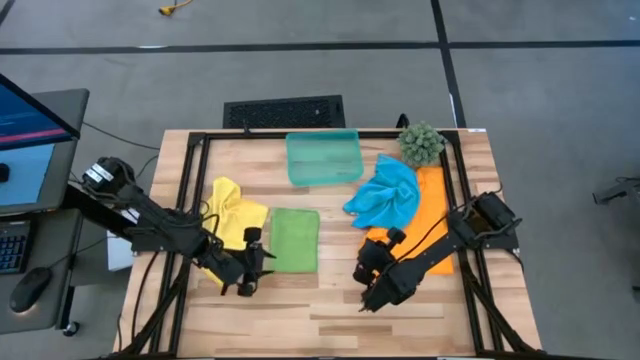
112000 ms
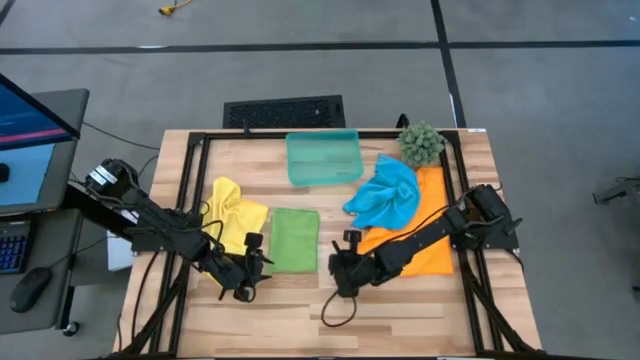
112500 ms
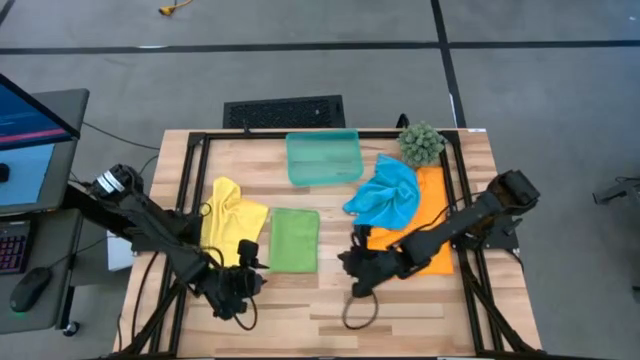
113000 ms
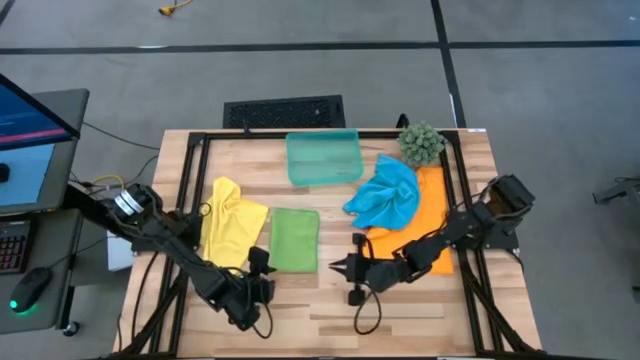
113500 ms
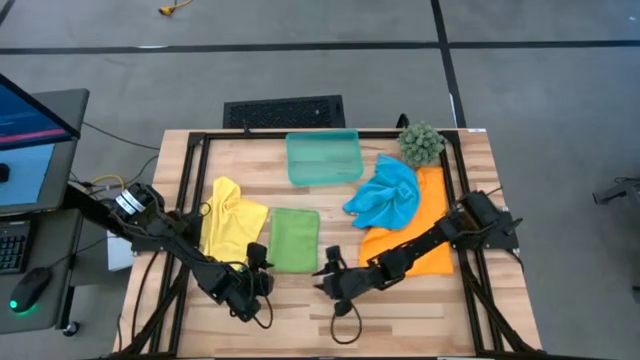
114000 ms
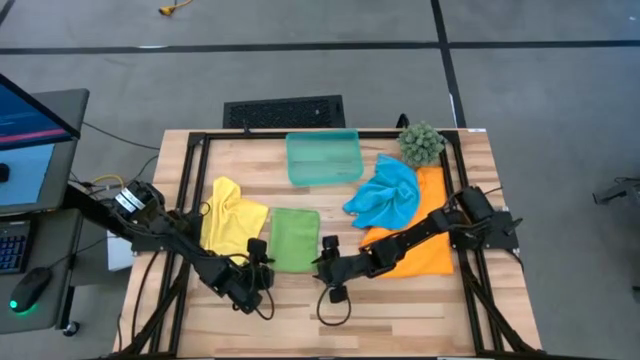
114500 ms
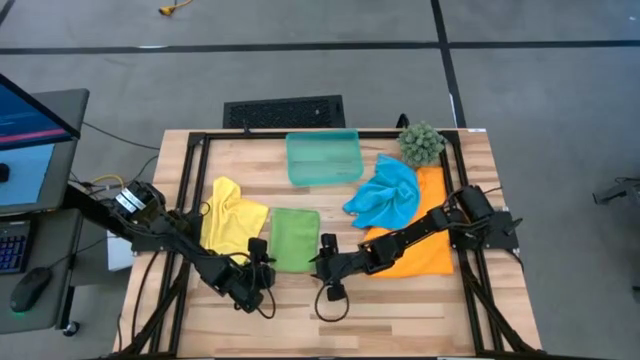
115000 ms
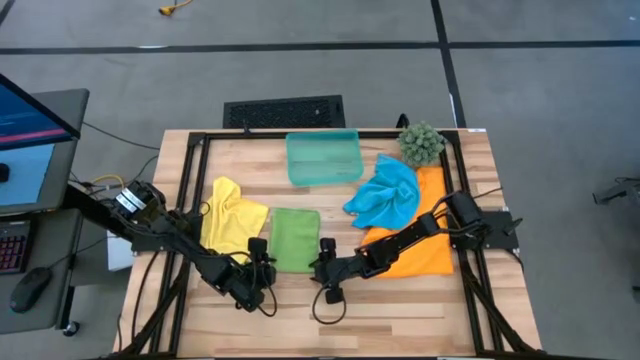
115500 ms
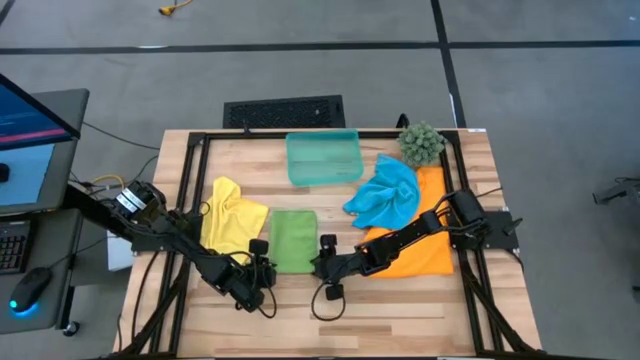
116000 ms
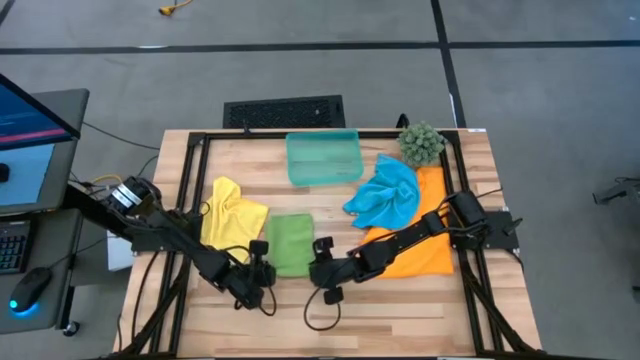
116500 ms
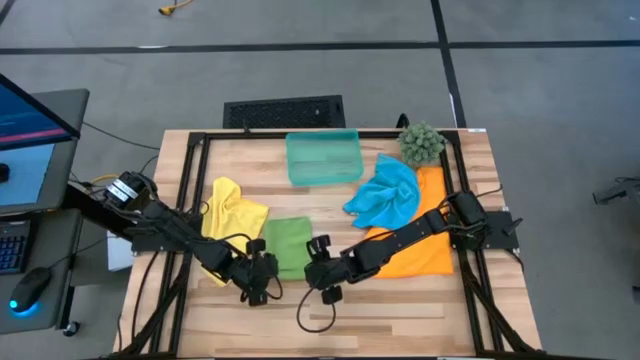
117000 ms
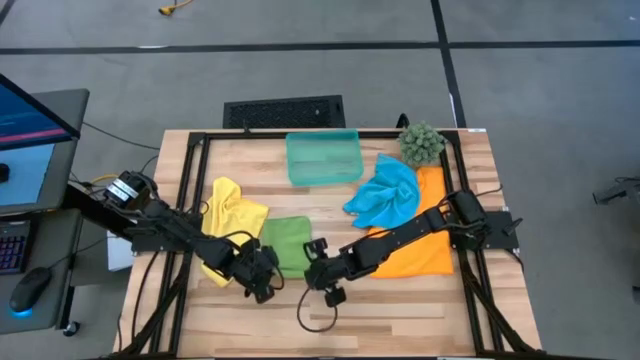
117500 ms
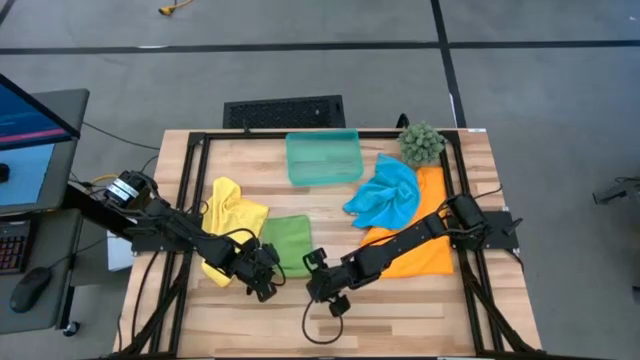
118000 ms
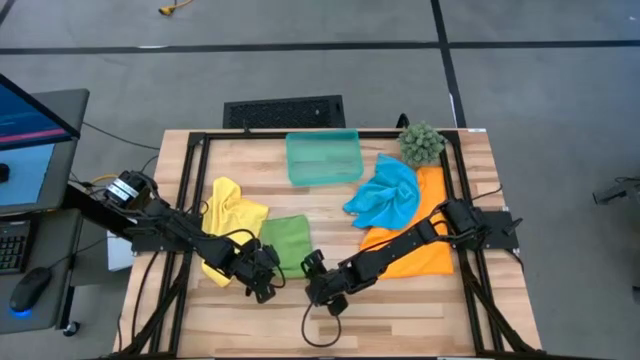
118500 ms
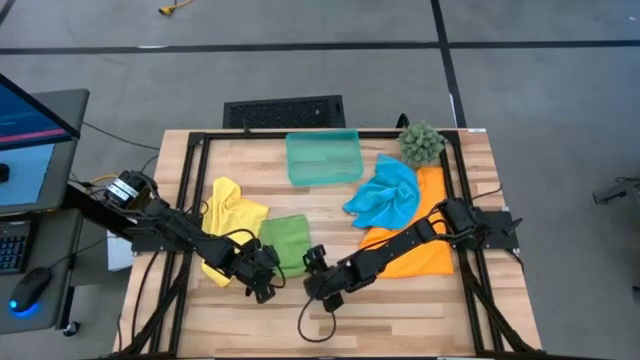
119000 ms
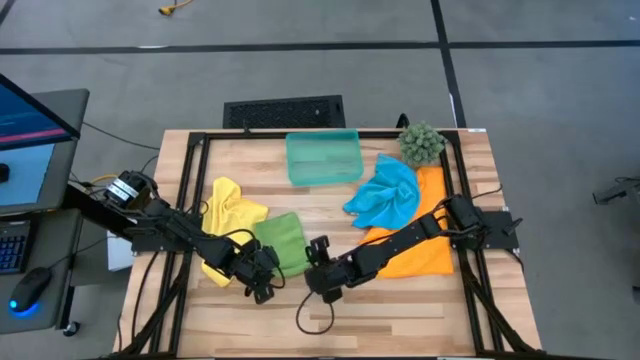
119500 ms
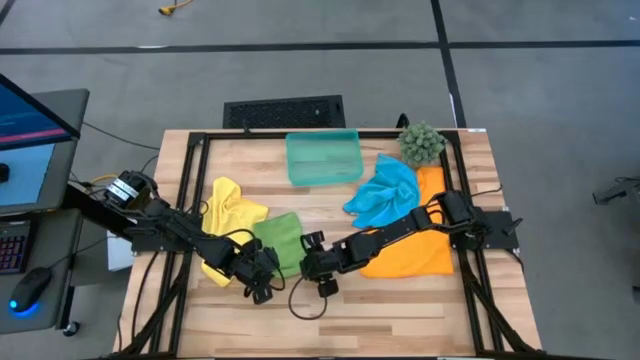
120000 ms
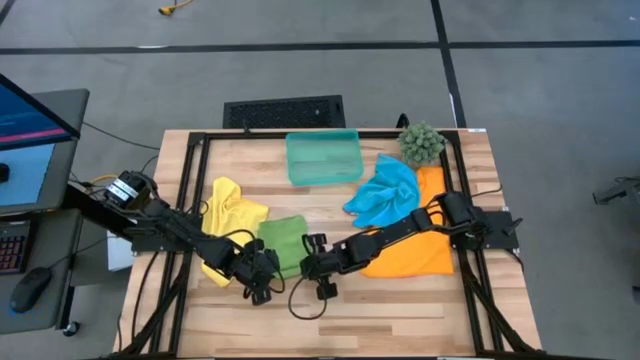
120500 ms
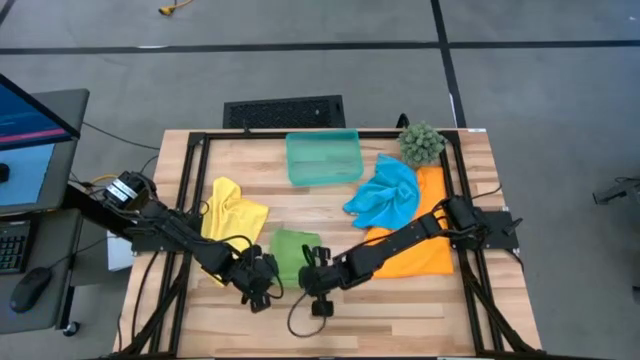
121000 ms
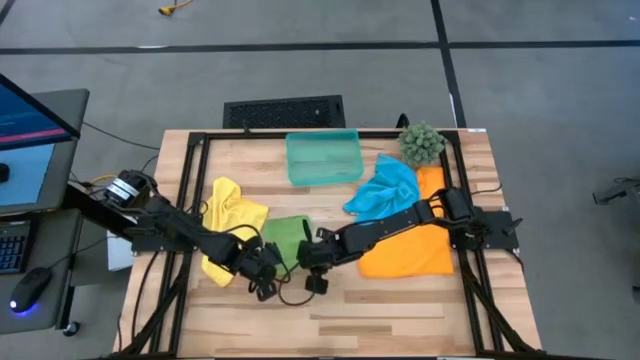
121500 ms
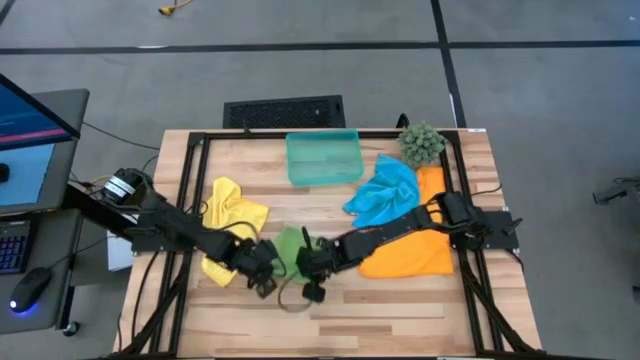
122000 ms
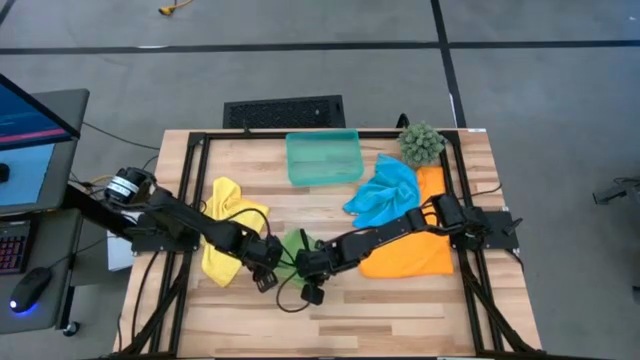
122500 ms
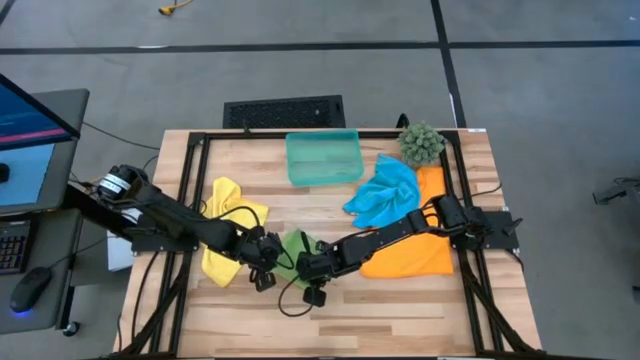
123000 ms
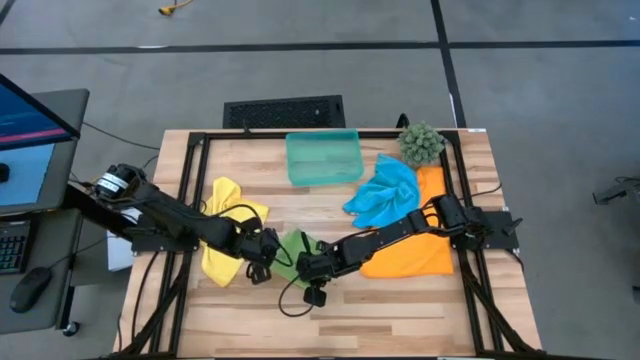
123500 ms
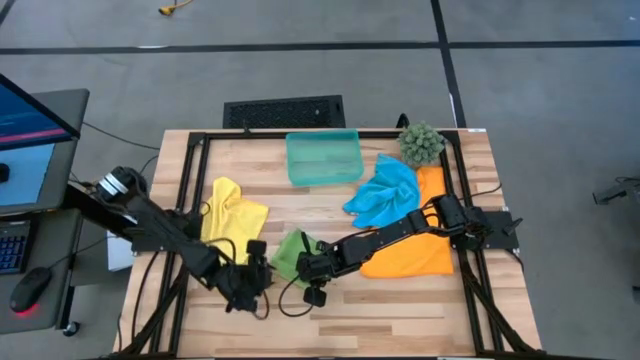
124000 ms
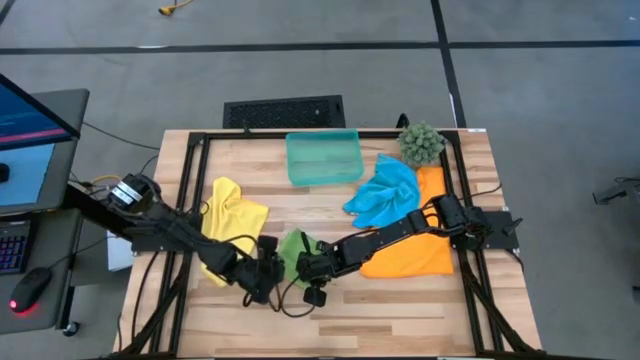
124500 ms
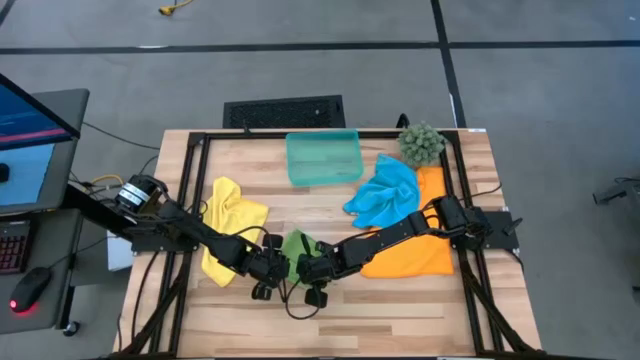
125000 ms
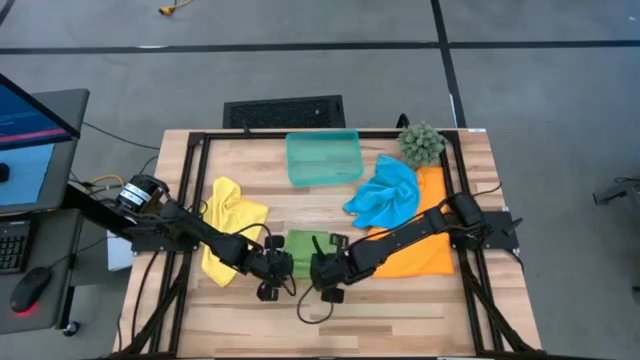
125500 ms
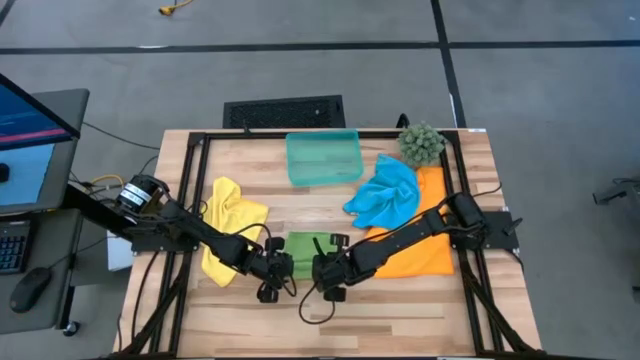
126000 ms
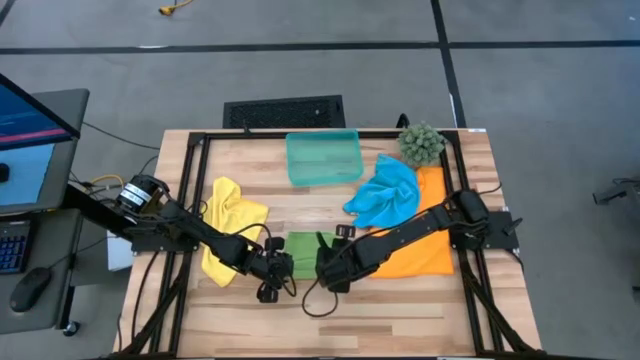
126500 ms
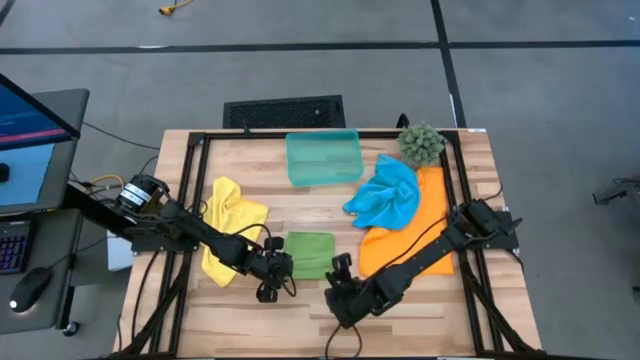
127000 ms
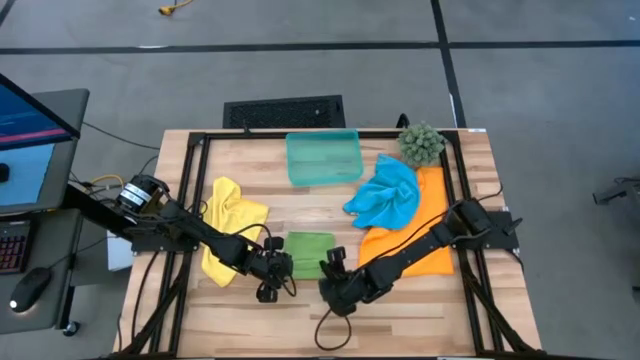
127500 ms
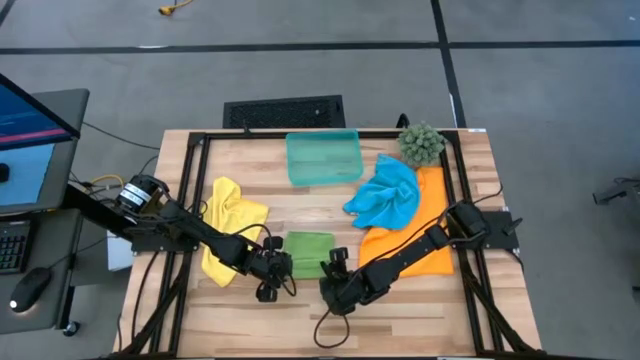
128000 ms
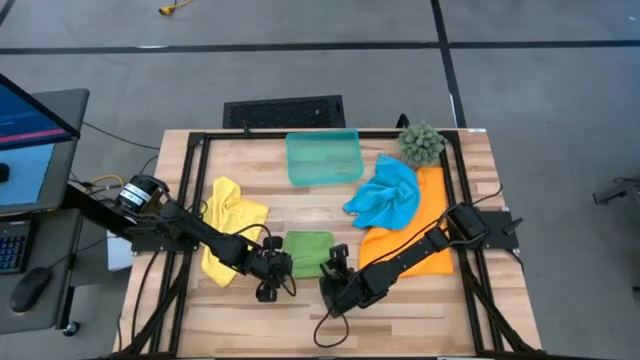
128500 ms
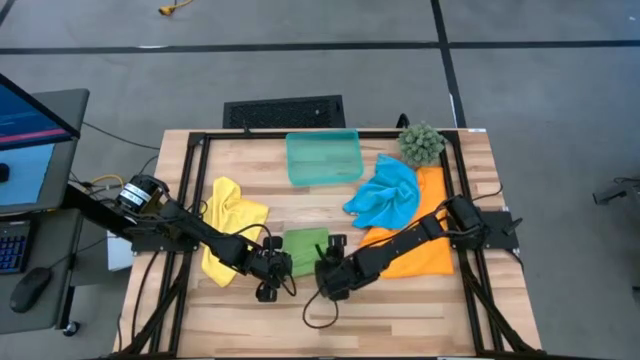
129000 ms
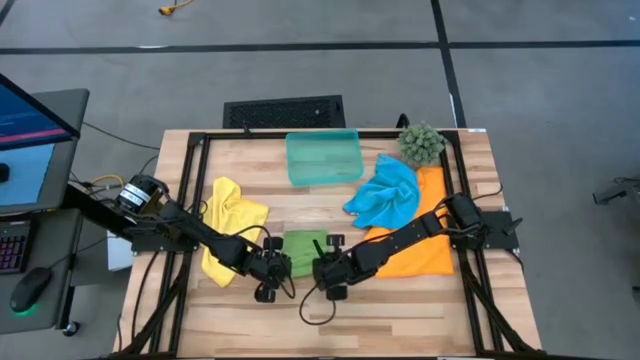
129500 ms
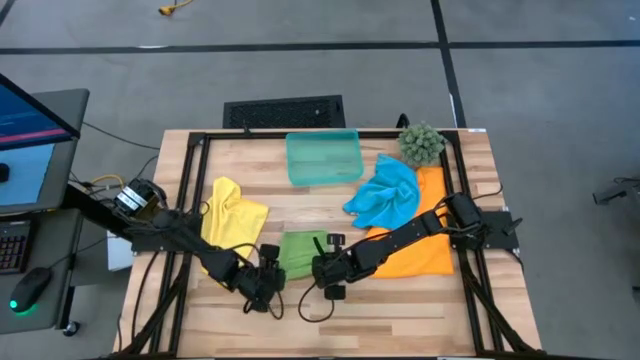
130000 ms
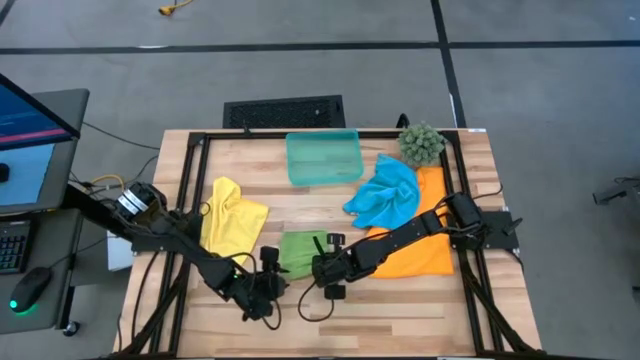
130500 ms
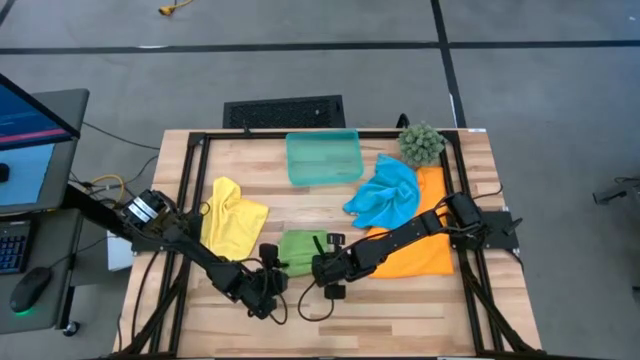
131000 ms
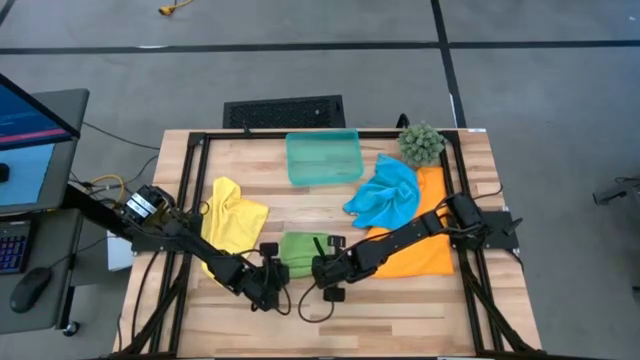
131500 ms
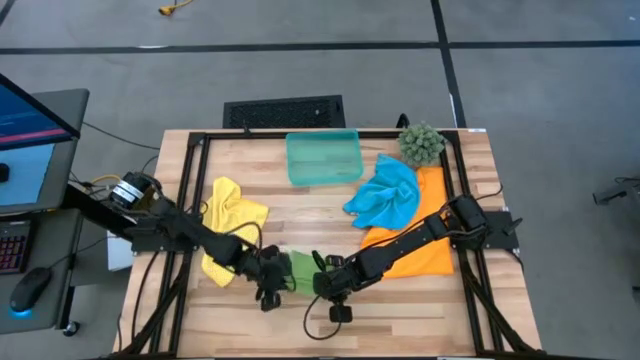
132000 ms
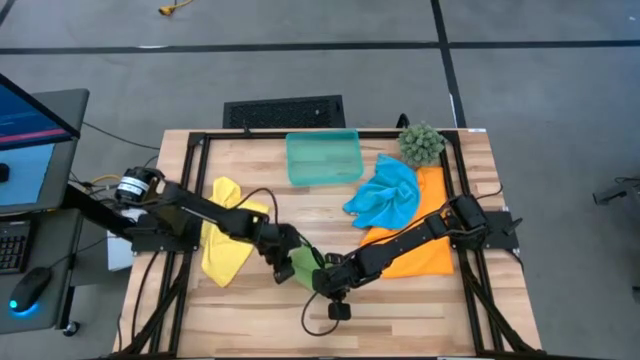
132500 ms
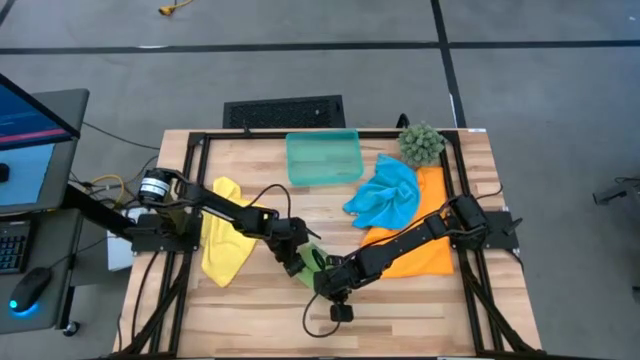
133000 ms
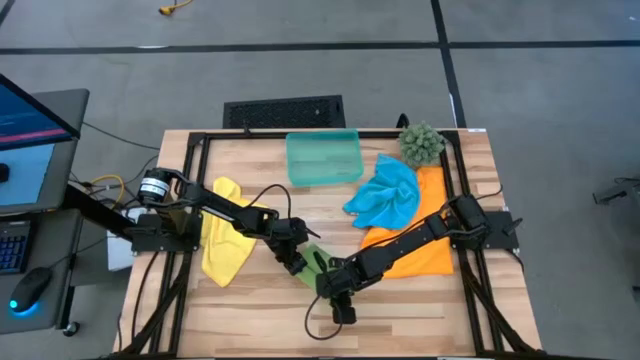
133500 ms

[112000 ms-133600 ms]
Task: Roll microfiber towels into tight, uniform cylinder then place into a basket
Roll the green microfiber cloth
